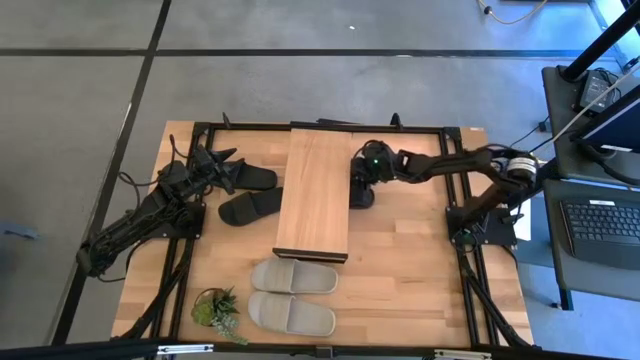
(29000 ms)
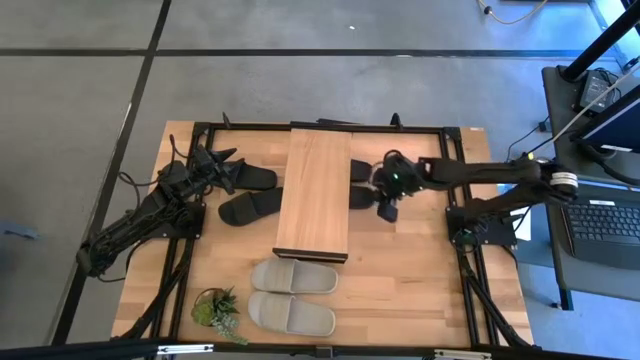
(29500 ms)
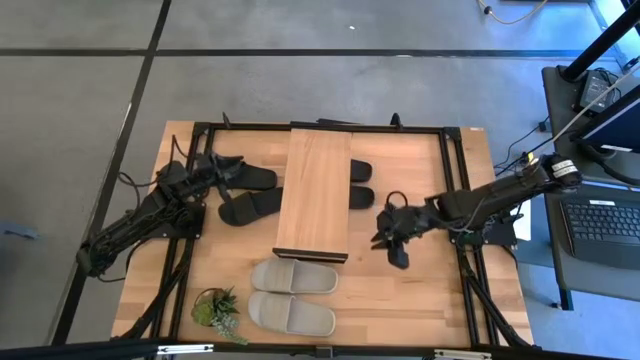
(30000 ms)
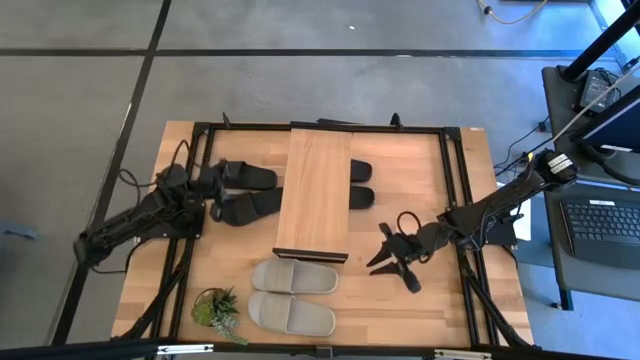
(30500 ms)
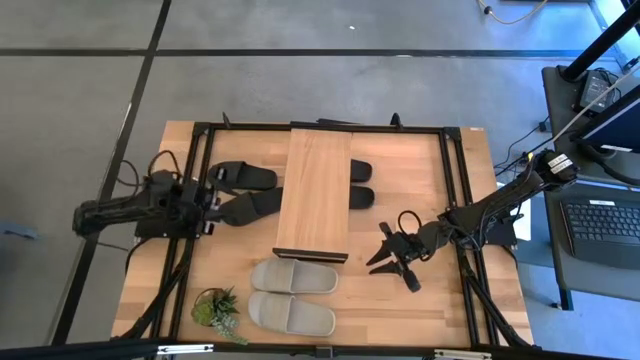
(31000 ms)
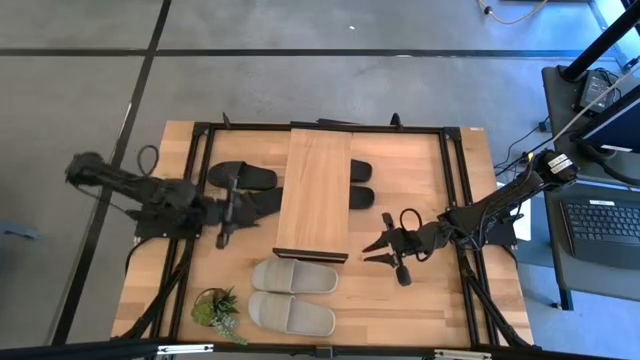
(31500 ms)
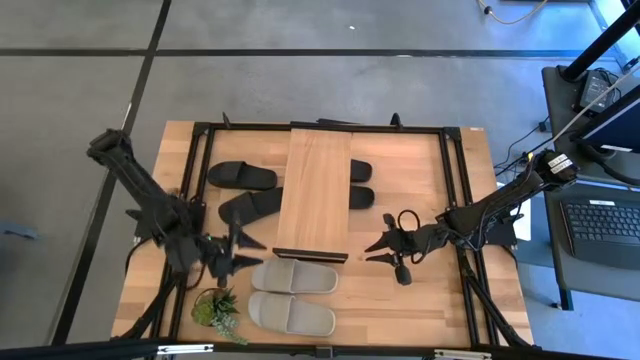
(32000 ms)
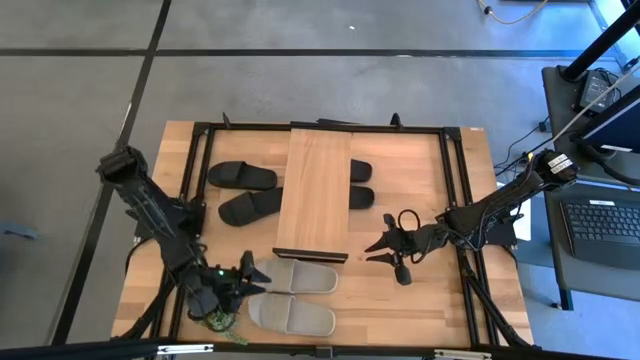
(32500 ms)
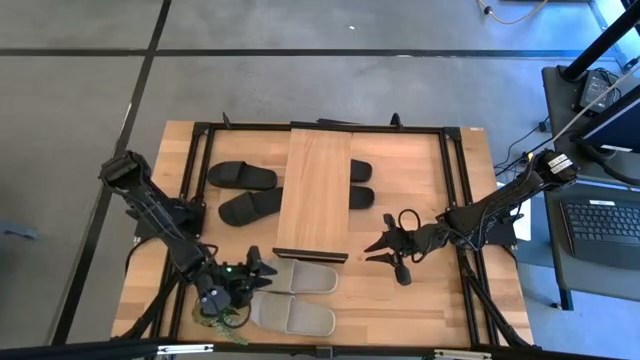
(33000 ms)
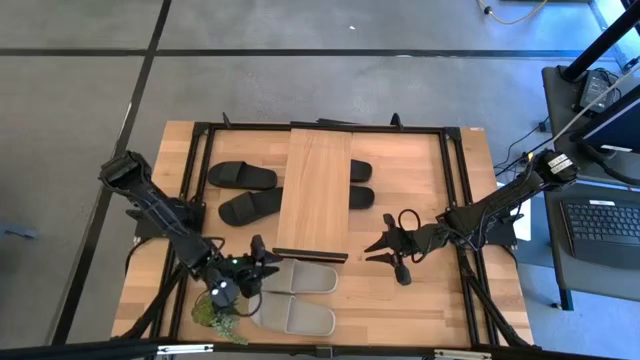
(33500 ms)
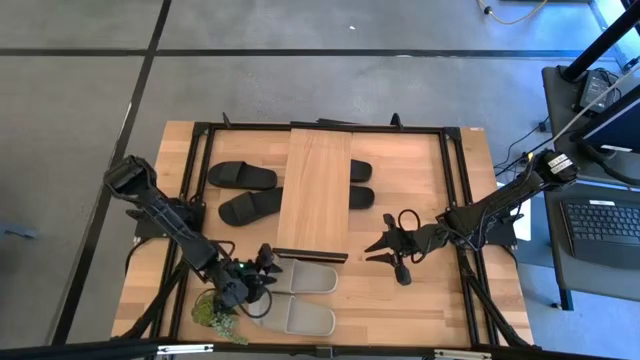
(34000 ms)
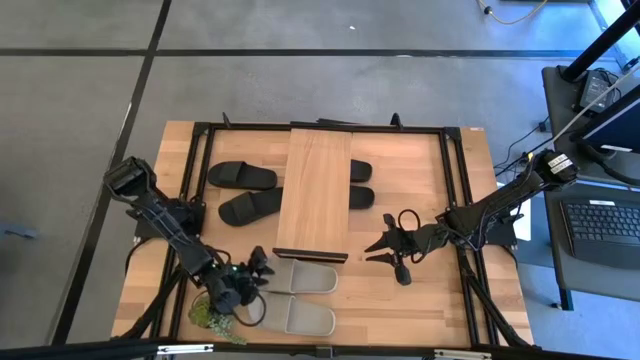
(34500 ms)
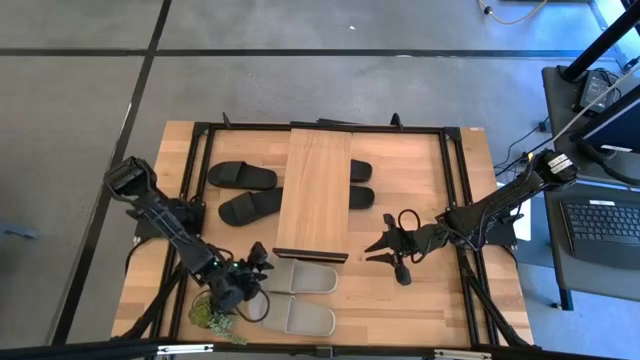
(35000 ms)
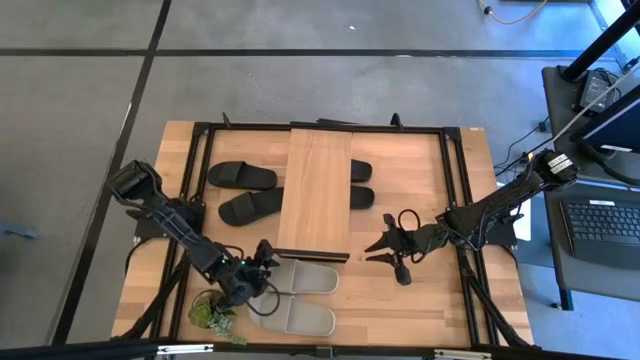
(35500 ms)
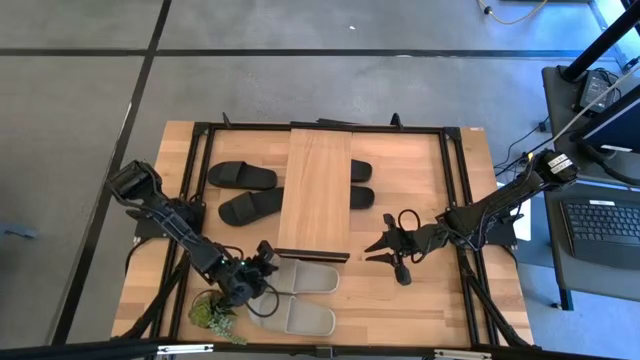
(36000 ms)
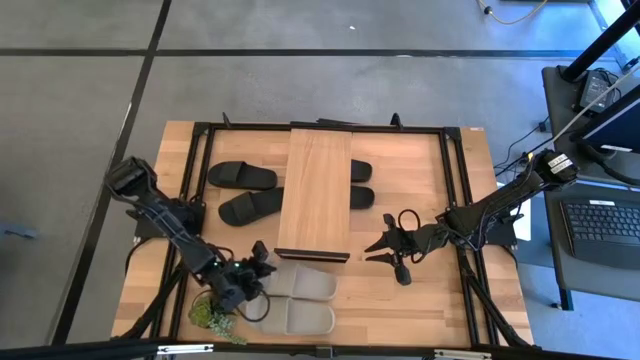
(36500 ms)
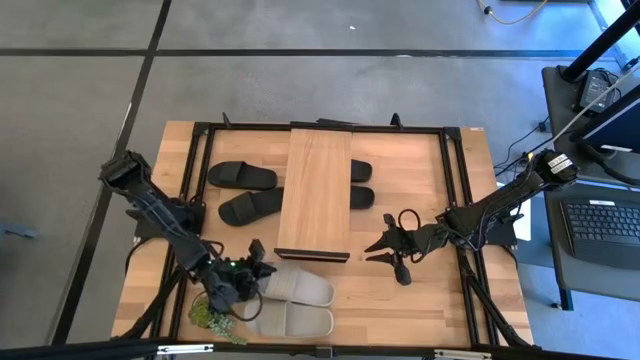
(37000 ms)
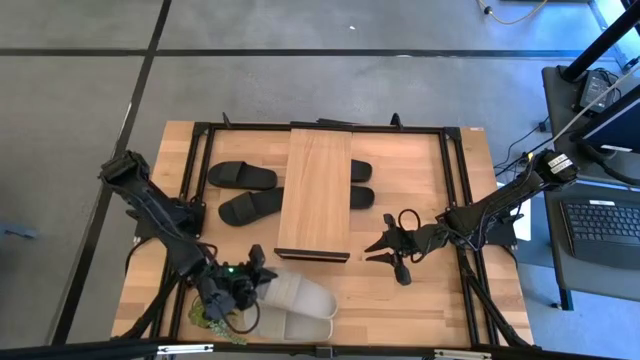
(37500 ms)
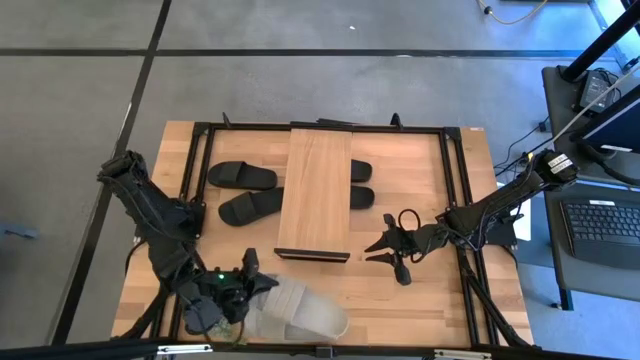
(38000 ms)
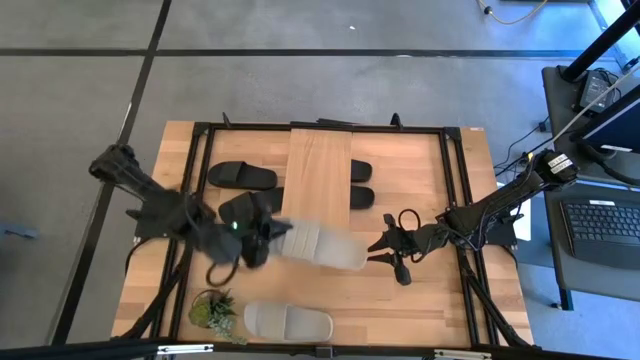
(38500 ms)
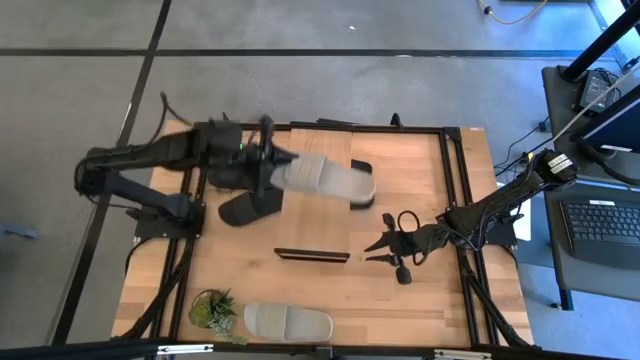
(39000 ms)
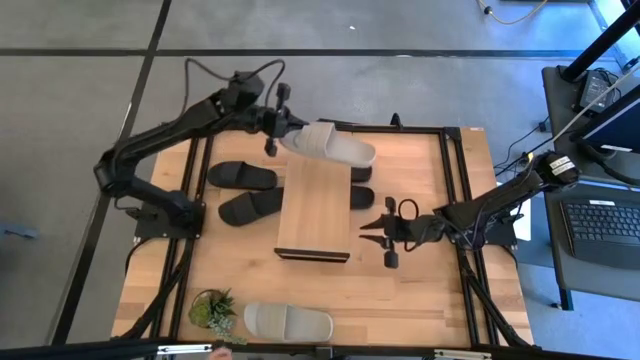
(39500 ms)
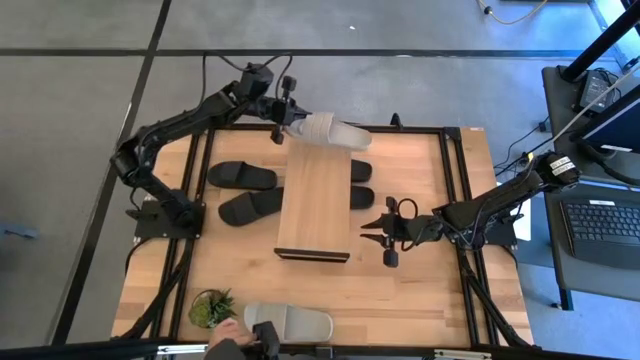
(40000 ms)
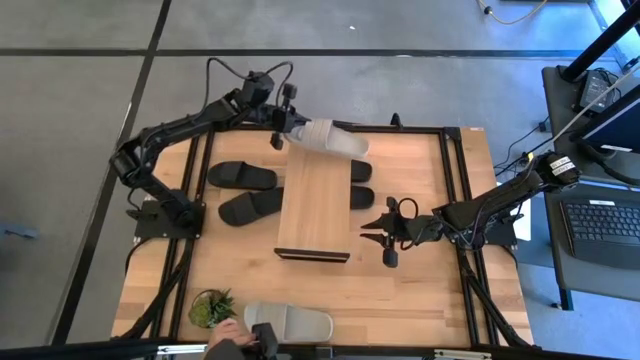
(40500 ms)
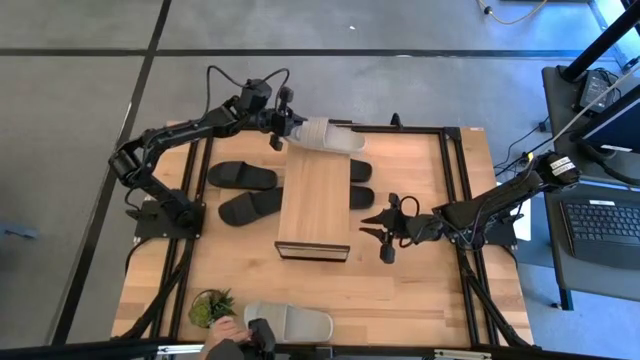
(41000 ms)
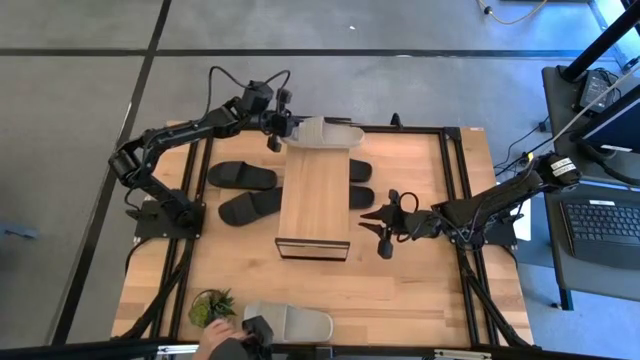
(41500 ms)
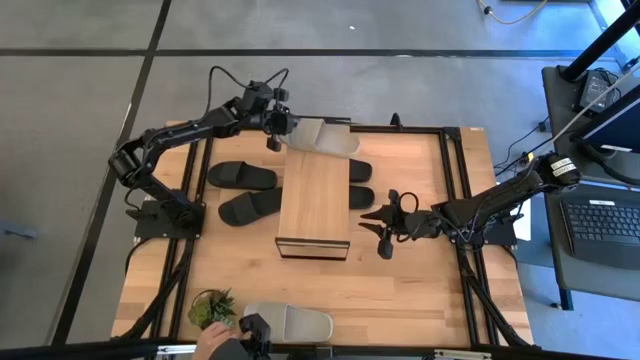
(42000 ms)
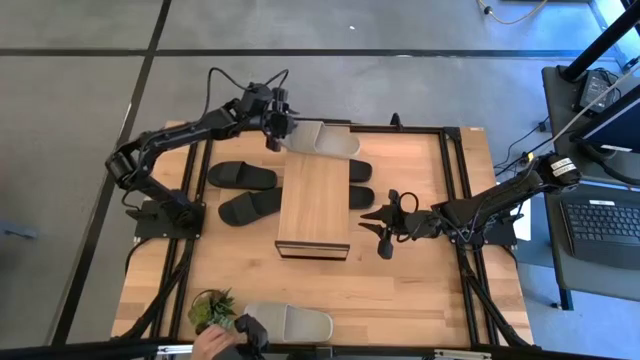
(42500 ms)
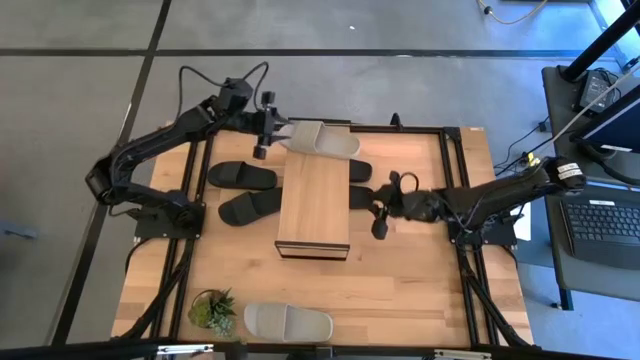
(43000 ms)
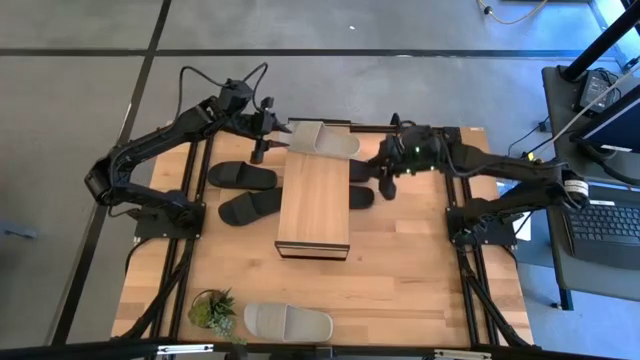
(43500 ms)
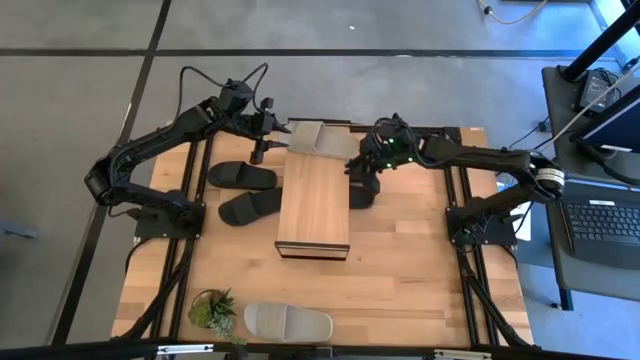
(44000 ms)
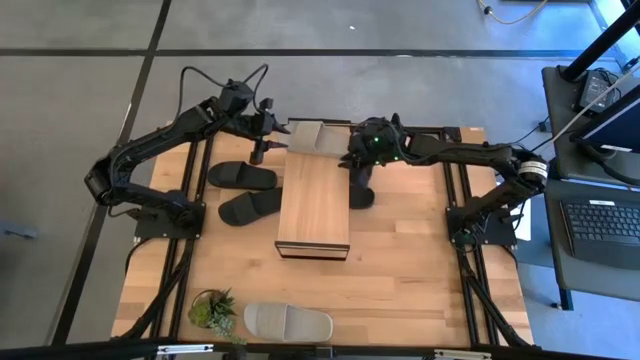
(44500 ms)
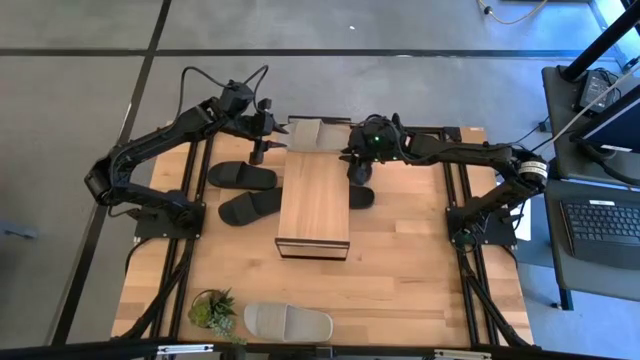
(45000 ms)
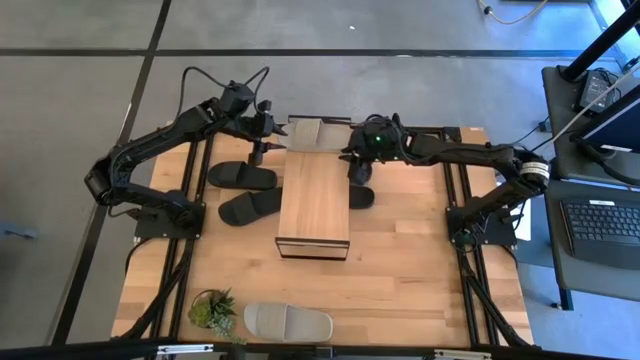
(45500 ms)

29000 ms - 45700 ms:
Task: Pick and place slides into the shelf
Put the top gray slide on the shelf

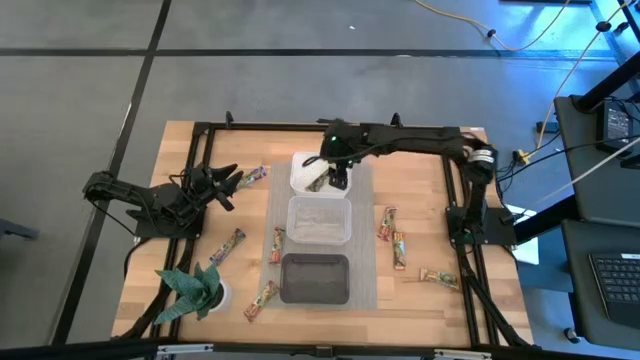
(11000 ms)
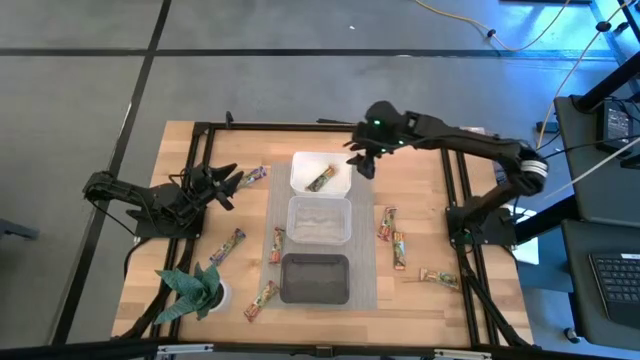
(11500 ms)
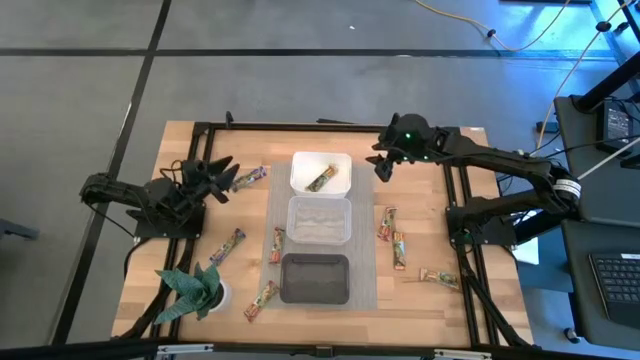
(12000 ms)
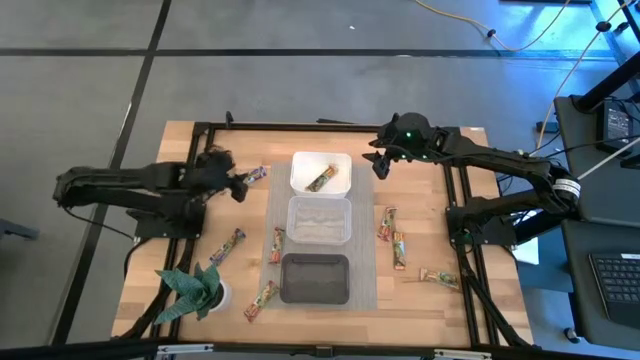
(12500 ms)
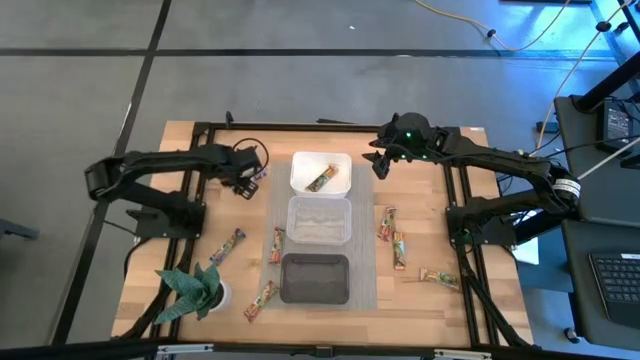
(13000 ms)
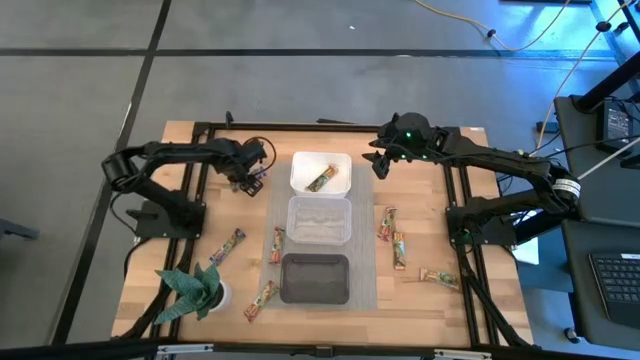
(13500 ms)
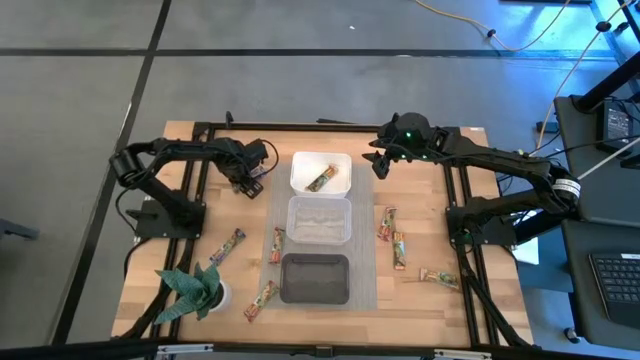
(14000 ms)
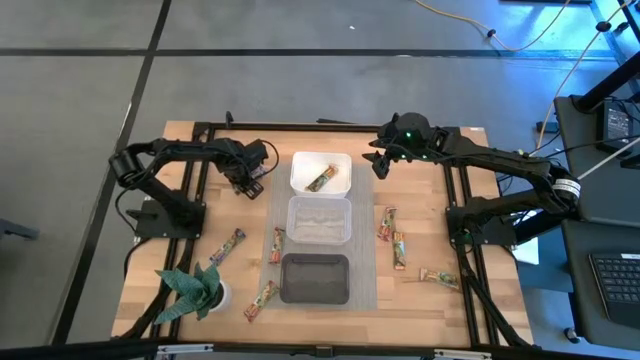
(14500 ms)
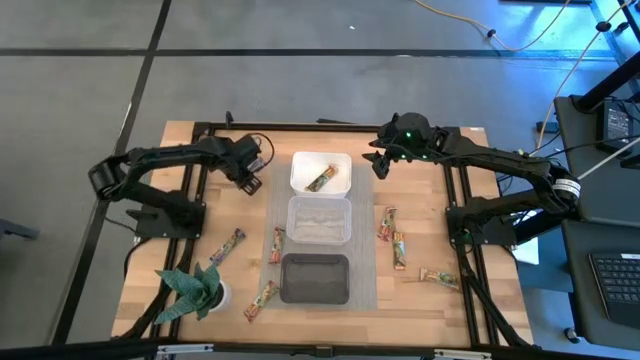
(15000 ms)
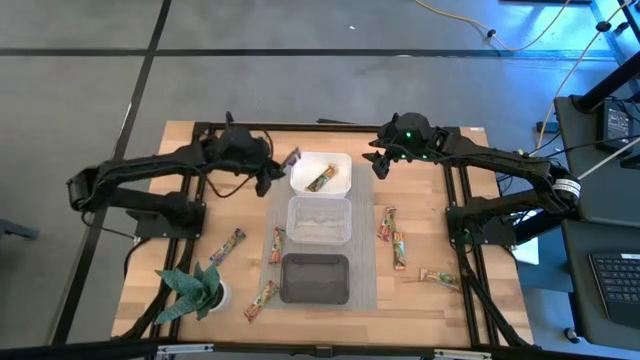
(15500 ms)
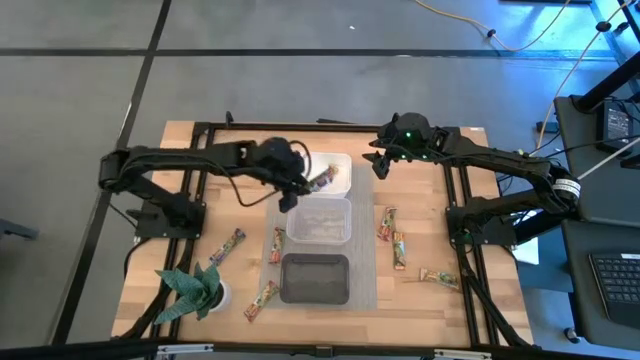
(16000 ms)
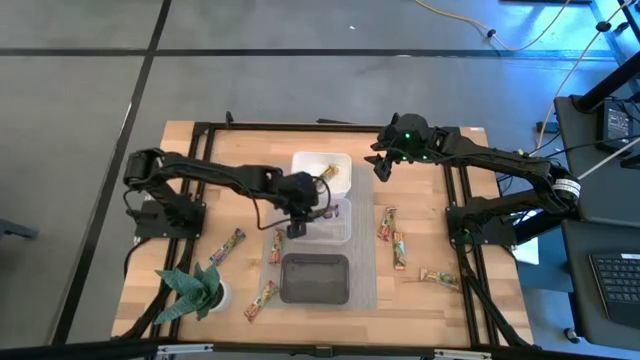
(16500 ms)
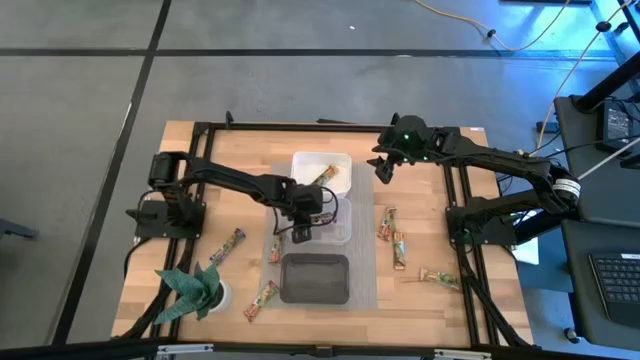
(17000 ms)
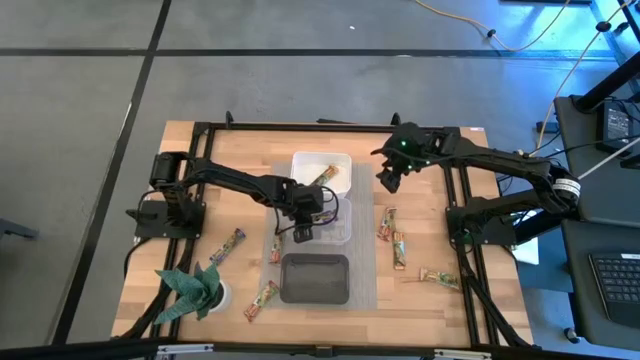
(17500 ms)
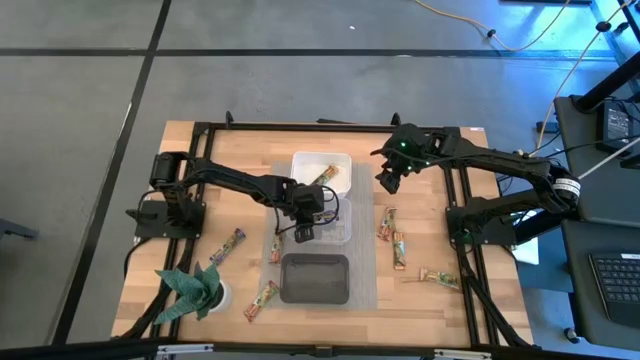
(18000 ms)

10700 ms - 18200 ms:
Task: Pick and place Granola Bars by type
Put the top blue granola bar into the transparent bin
